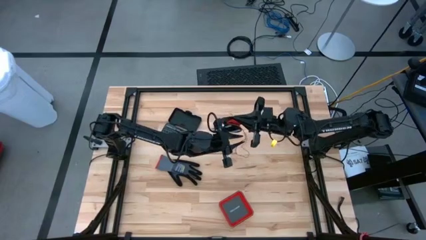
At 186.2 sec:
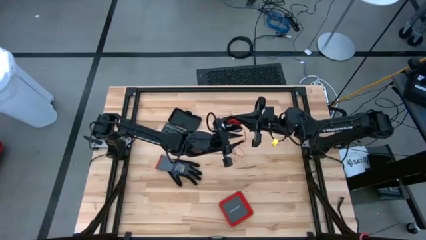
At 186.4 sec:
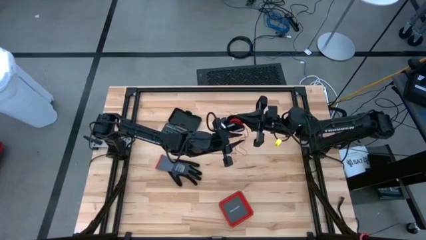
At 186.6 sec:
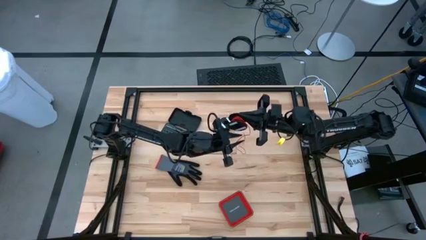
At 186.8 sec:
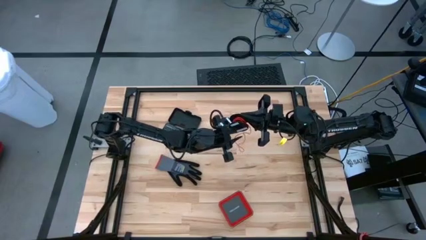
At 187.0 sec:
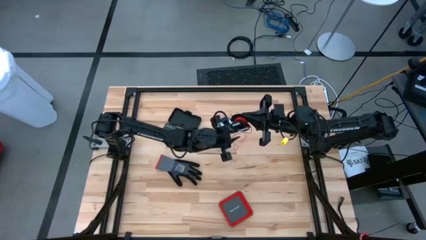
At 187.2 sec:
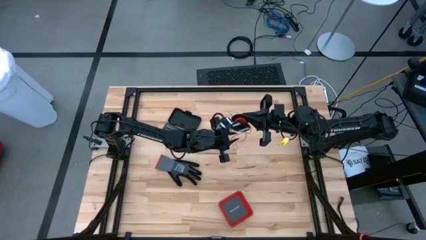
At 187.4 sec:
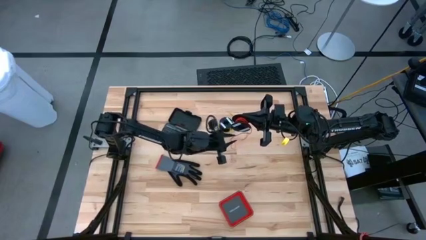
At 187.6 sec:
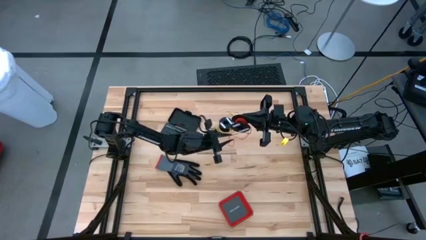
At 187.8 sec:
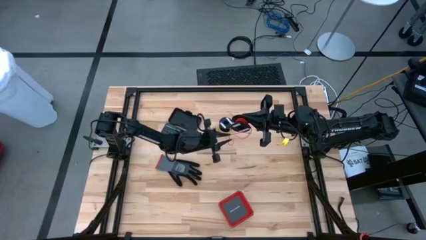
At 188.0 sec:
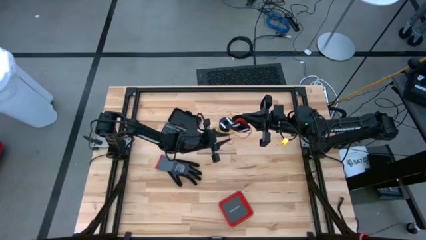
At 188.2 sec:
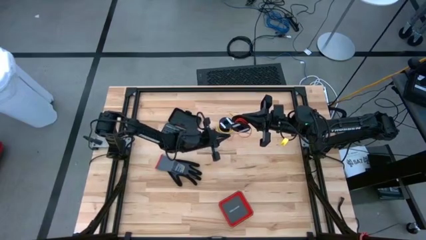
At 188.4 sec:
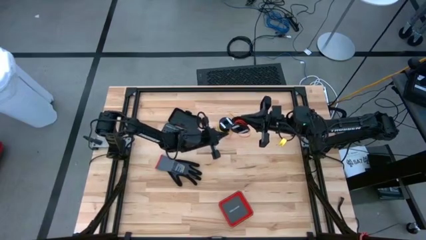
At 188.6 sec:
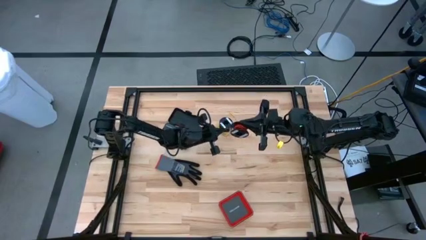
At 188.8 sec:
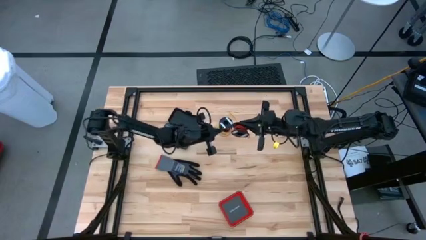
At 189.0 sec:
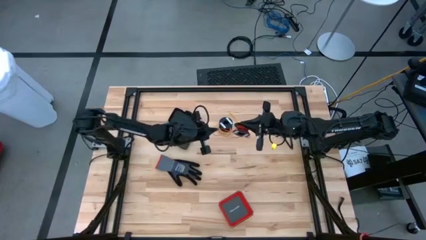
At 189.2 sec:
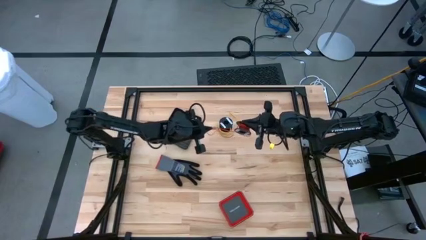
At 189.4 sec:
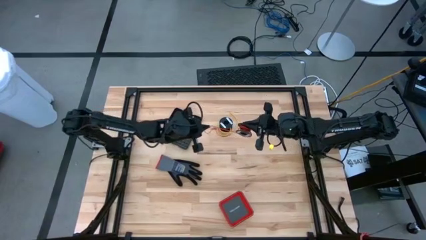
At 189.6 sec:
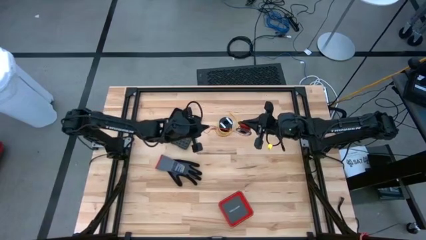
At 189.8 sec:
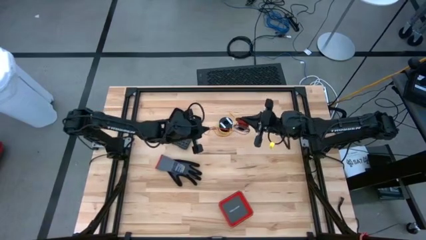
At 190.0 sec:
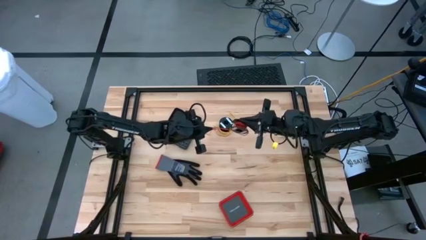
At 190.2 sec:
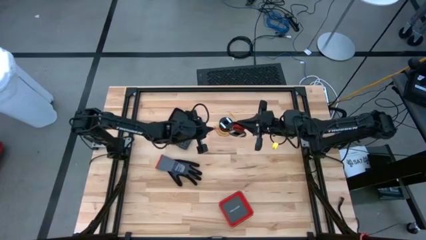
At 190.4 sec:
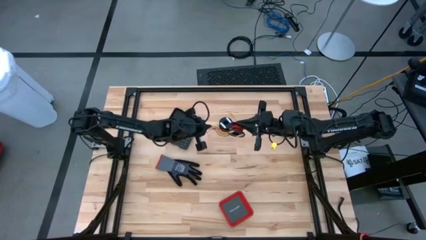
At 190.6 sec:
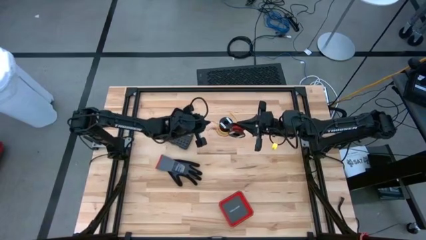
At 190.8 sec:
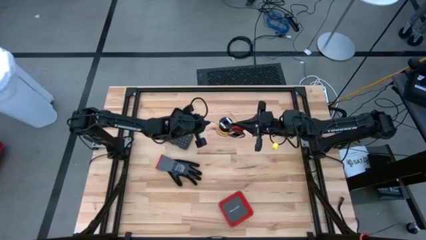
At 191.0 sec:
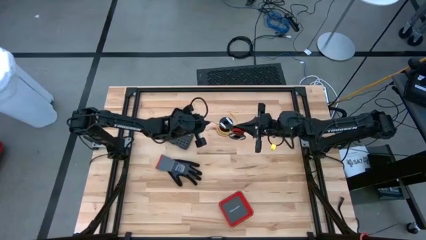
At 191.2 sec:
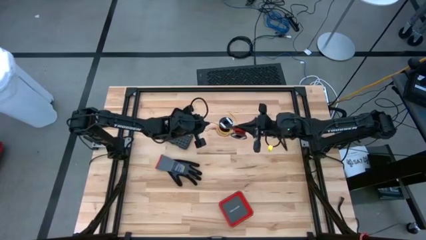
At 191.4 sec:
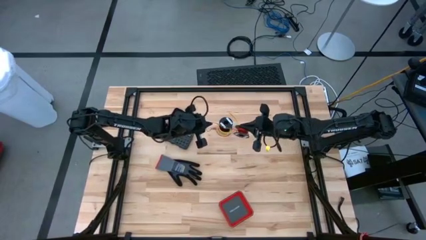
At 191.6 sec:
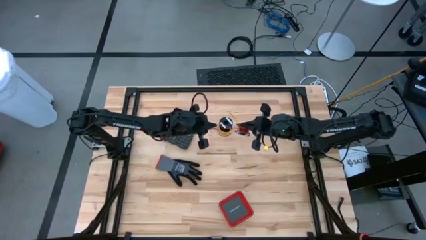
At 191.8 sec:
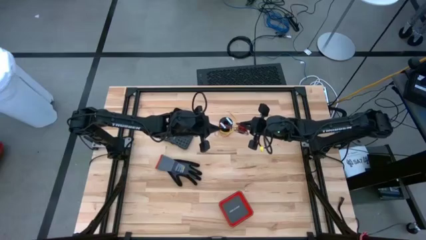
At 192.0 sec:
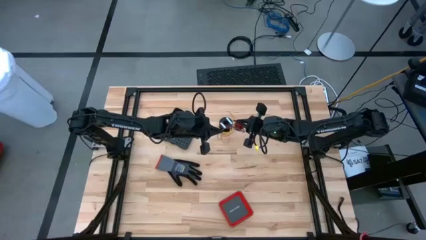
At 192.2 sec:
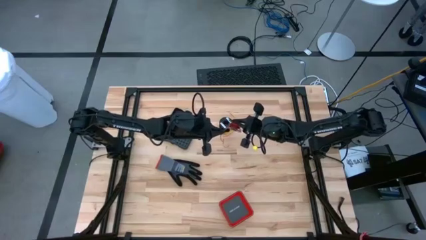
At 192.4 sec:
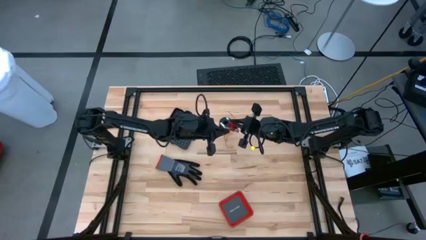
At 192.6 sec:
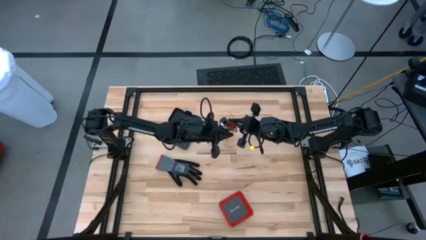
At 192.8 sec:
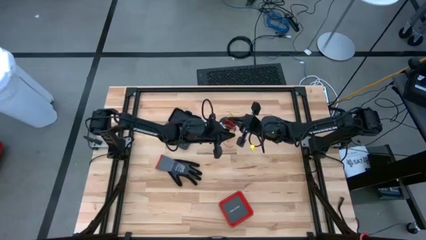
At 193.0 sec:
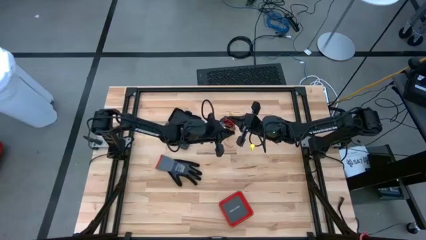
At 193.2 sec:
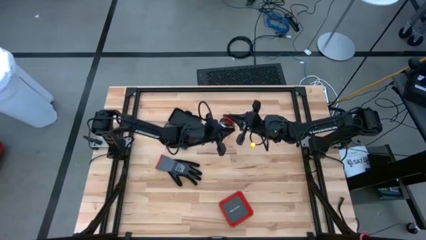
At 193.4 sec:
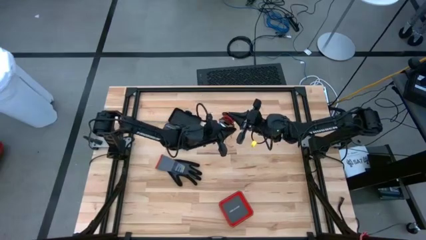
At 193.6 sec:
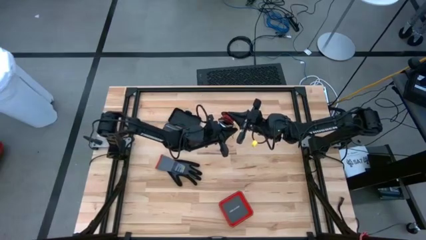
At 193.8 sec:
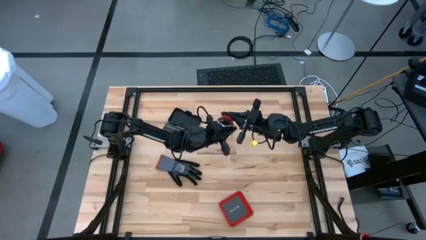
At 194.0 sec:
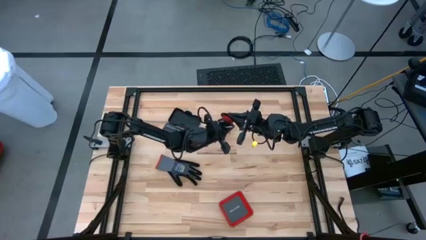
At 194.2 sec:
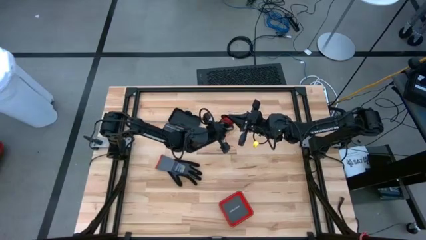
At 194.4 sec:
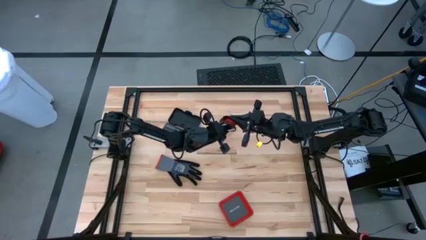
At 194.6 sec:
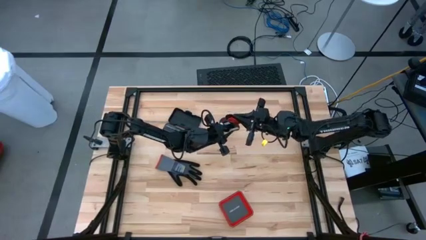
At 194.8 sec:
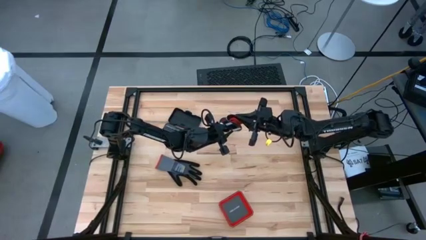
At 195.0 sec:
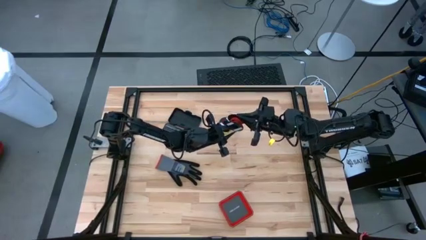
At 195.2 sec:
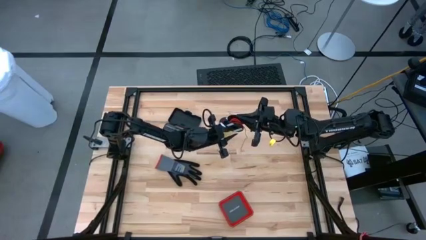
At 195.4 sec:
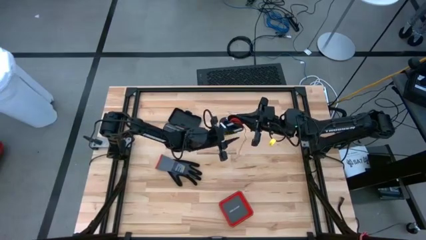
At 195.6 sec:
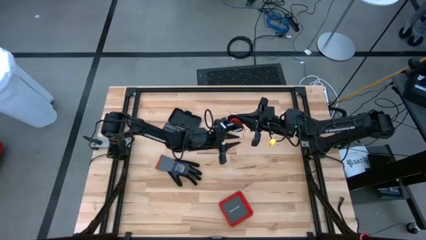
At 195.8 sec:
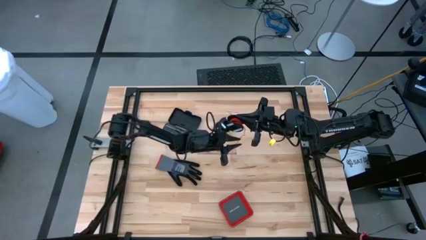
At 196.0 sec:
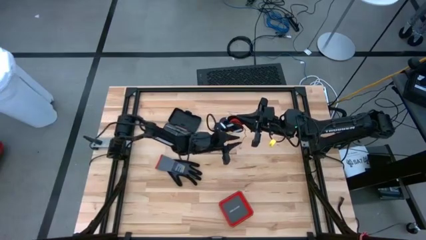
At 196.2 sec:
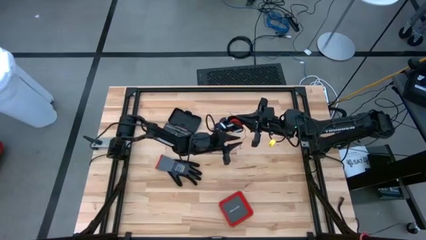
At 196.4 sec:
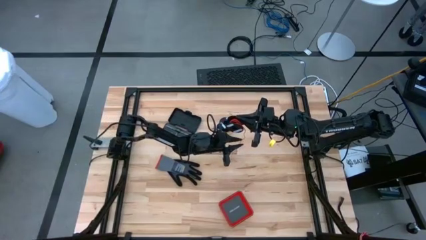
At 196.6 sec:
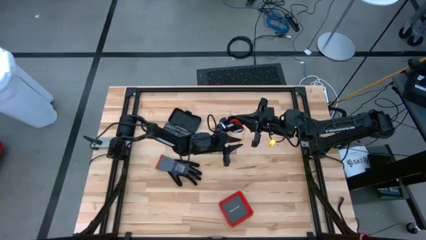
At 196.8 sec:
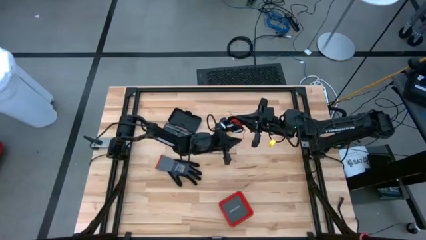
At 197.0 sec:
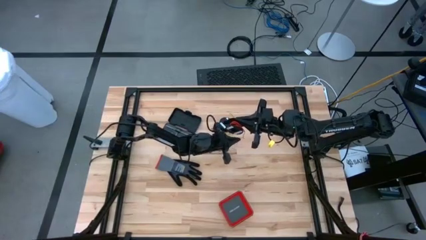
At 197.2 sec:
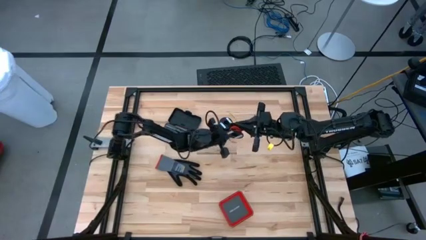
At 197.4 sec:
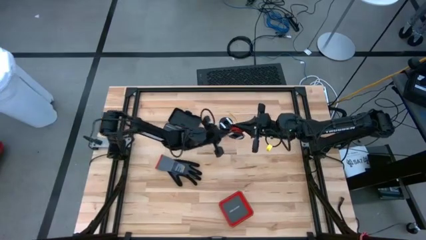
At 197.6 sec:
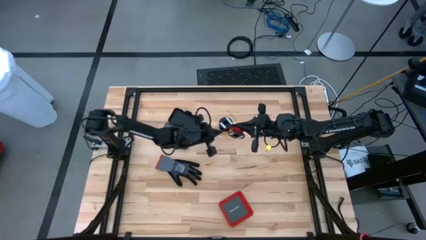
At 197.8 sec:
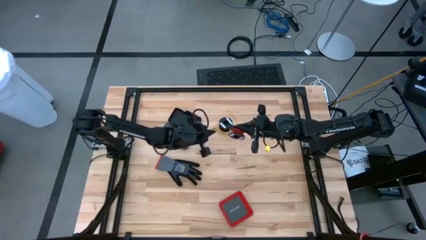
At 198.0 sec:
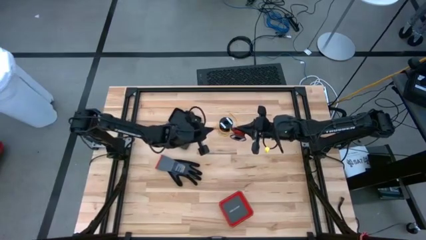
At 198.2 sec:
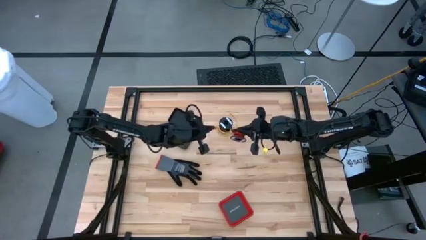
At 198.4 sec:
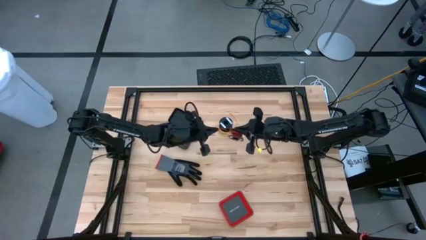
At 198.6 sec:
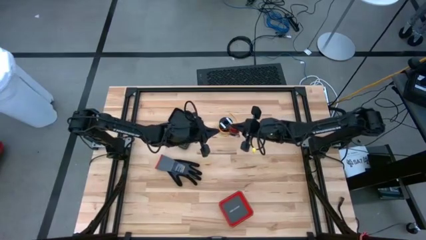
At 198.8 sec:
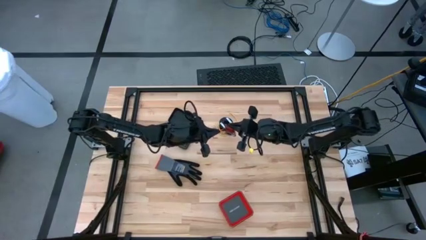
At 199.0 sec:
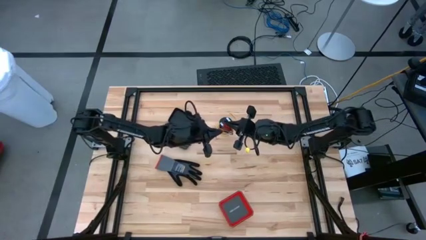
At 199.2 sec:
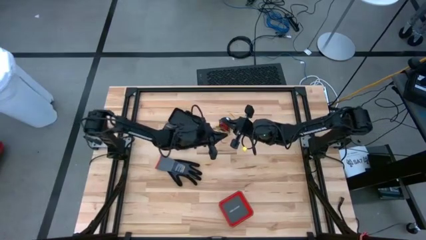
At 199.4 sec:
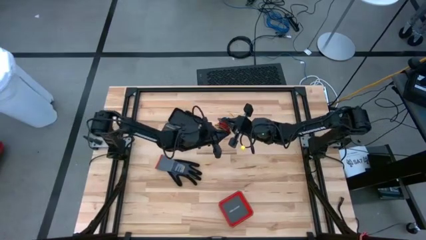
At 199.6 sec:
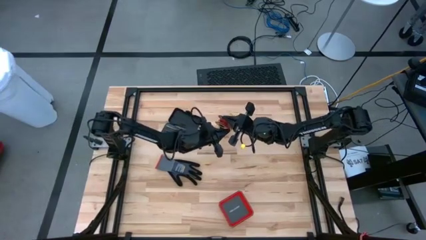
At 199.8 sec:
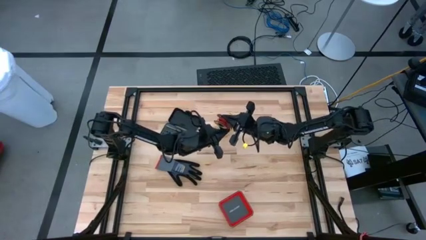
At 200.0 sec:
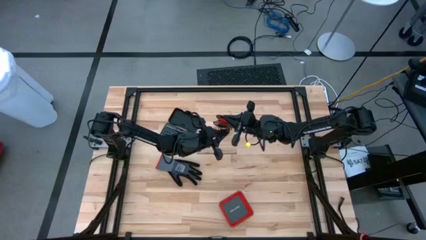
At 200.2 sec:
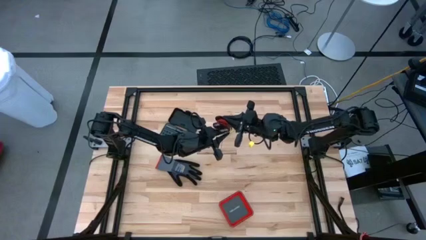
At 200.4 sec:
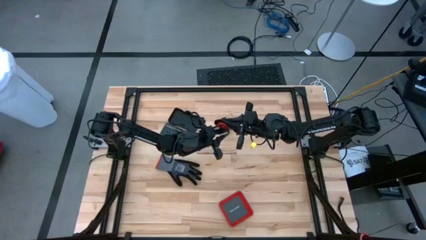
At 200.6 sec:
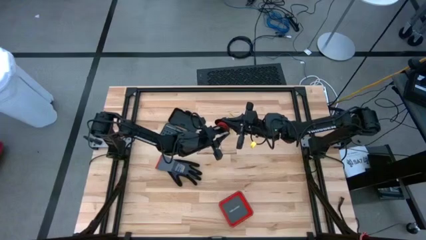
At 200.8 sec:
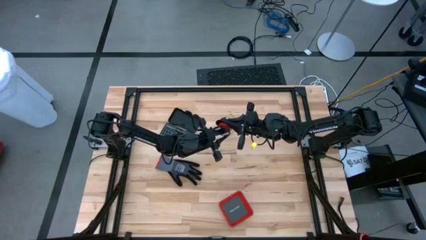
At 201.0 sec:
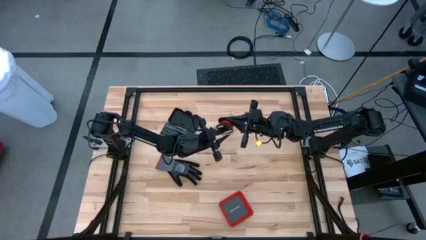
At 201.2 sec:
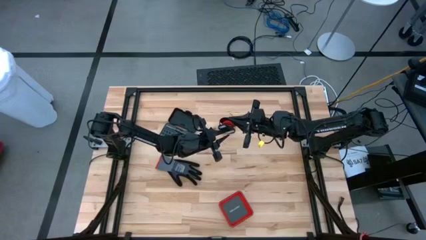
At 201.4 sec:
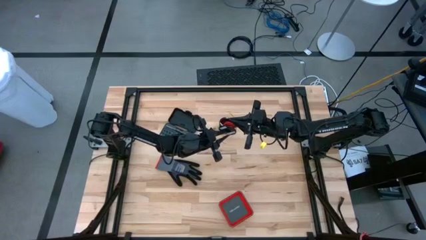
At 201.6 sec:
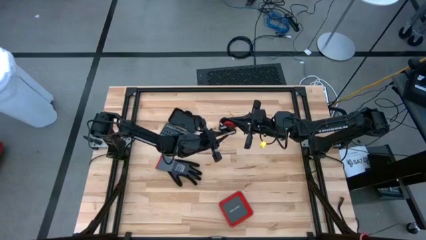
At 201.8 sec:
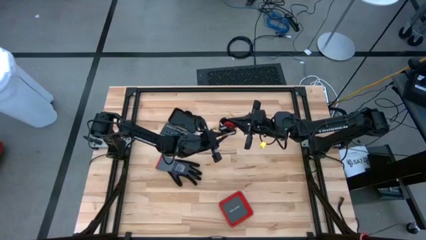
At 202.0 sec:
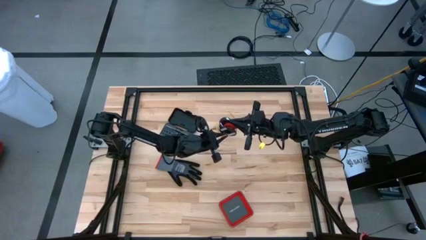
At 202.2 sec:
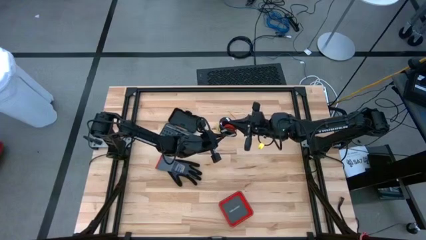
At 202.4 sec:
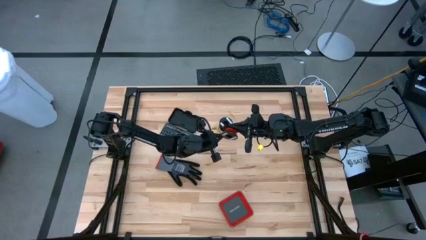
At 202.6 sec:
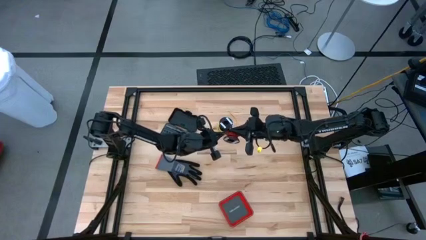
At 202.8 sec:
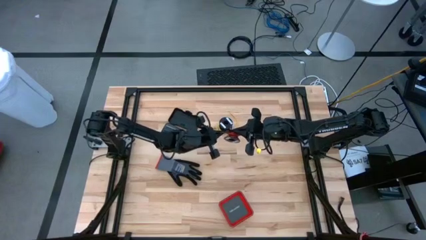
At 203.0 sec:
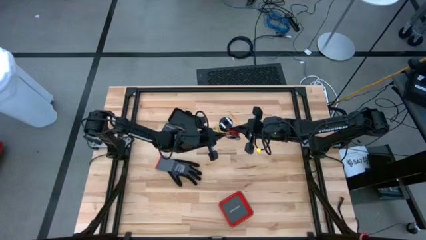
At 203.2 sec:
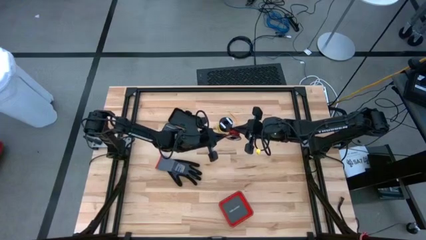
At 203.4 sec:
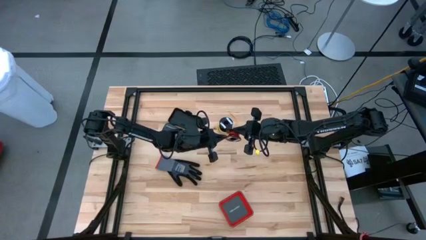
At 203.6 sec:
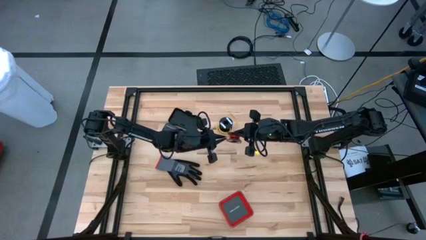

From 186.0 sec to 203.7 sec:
Task: Coil cords
Coil the red wire onto the spool
